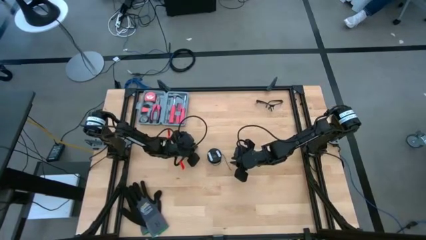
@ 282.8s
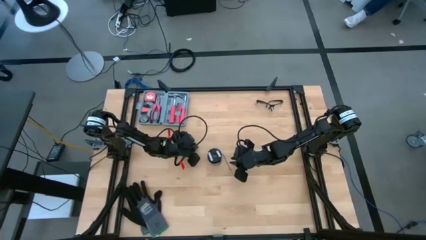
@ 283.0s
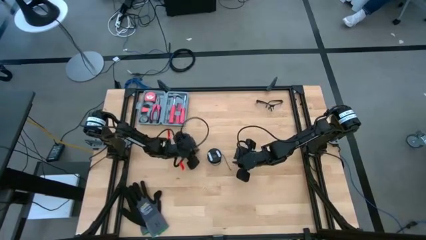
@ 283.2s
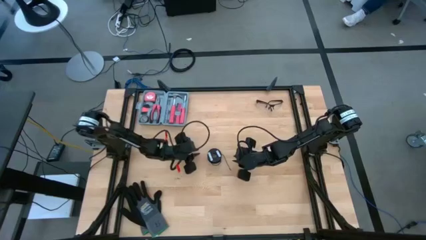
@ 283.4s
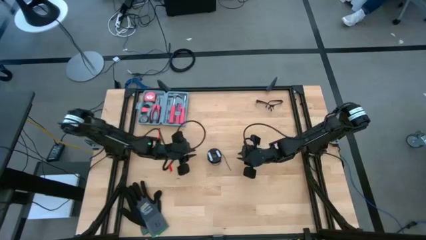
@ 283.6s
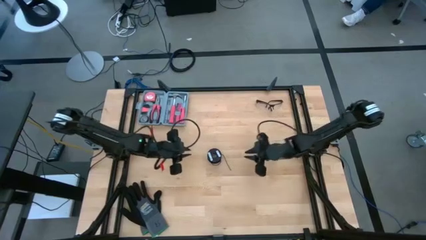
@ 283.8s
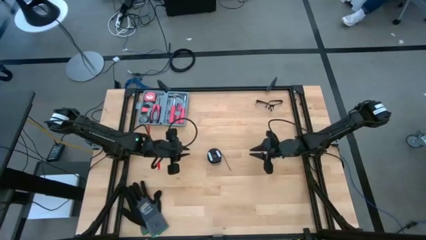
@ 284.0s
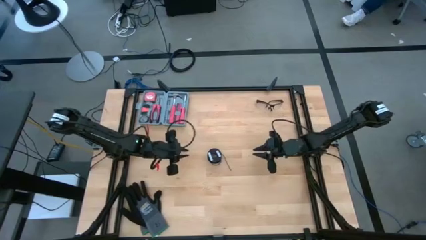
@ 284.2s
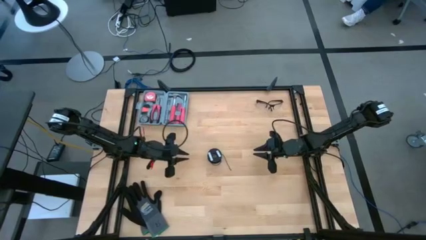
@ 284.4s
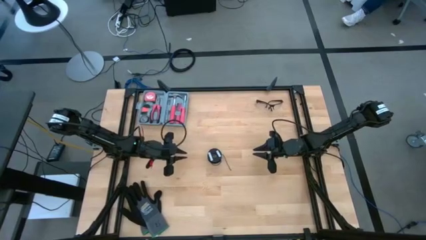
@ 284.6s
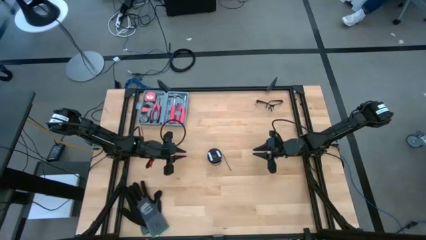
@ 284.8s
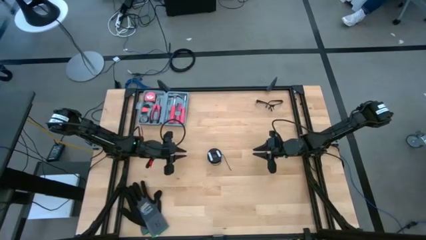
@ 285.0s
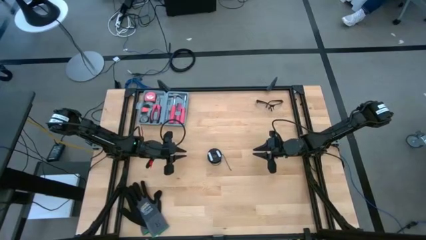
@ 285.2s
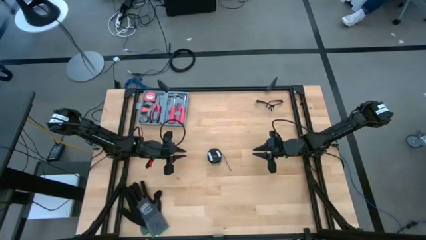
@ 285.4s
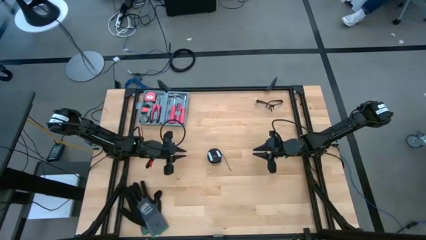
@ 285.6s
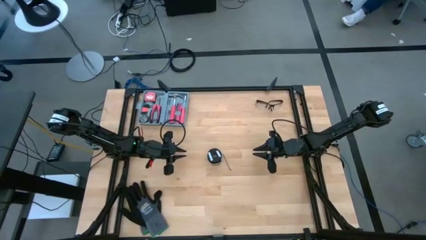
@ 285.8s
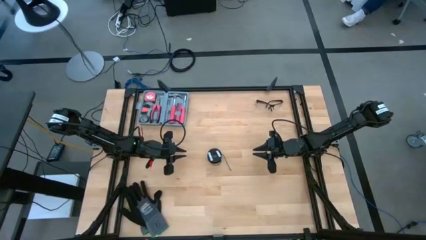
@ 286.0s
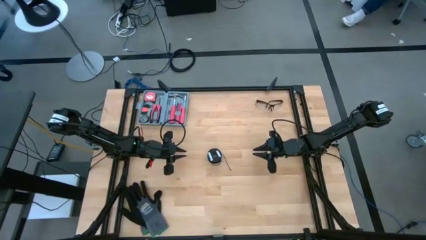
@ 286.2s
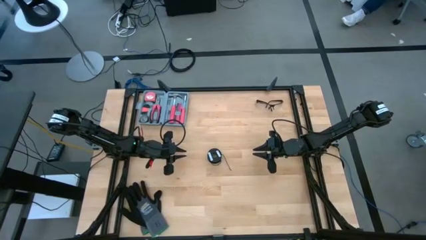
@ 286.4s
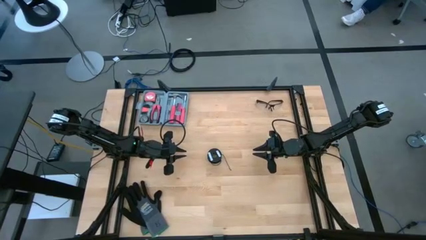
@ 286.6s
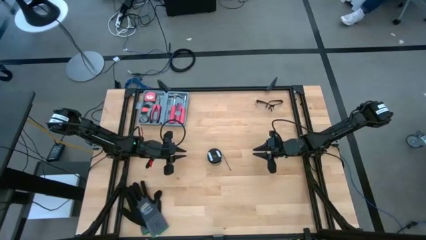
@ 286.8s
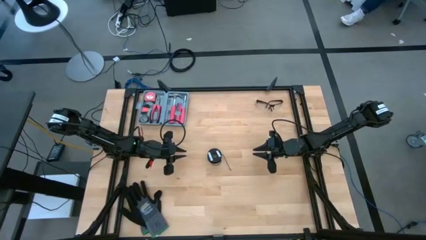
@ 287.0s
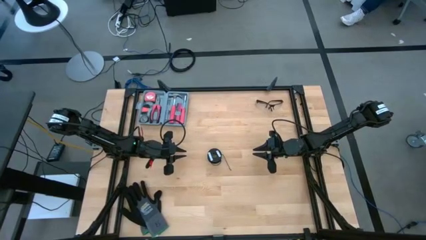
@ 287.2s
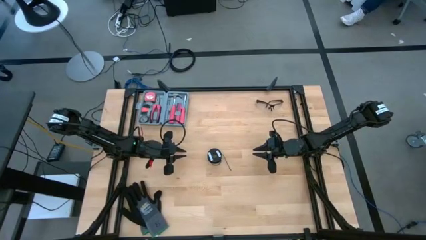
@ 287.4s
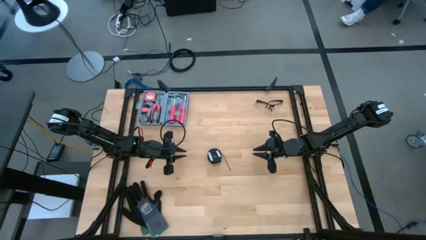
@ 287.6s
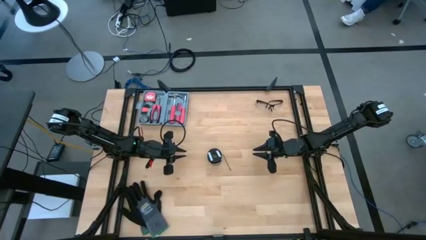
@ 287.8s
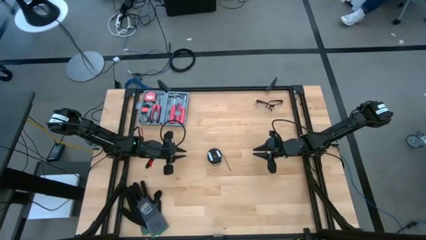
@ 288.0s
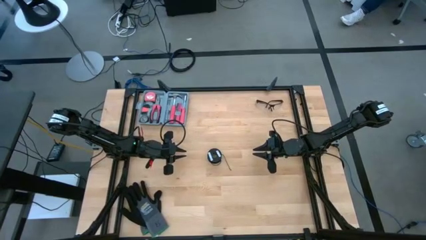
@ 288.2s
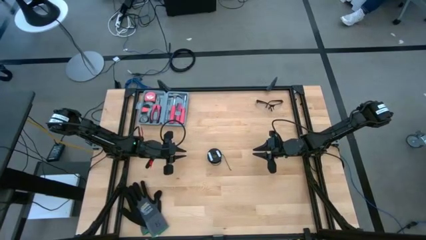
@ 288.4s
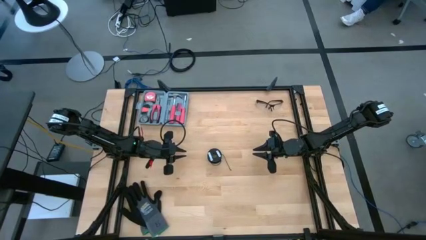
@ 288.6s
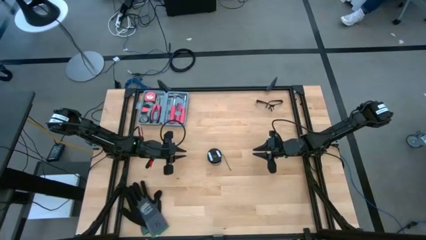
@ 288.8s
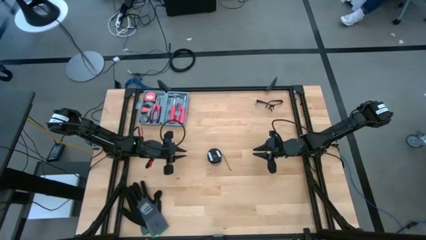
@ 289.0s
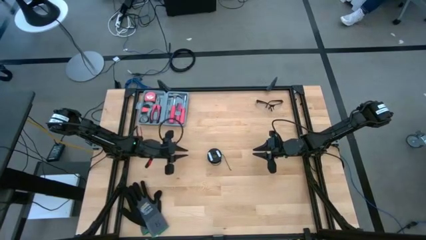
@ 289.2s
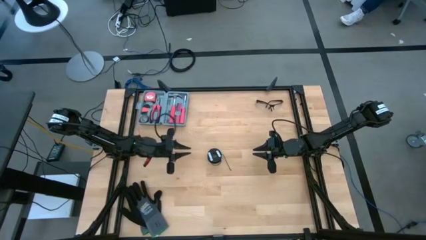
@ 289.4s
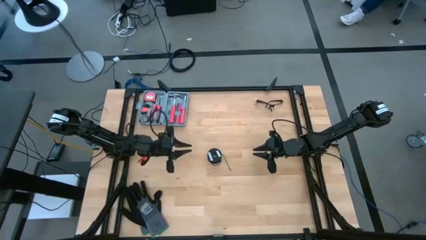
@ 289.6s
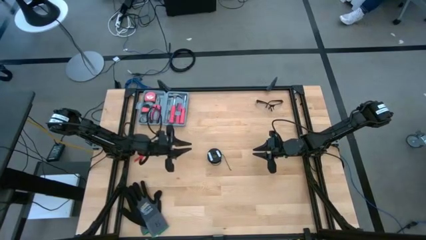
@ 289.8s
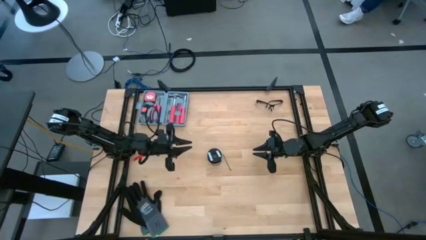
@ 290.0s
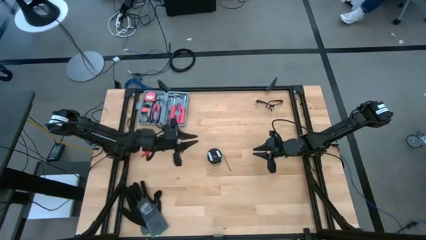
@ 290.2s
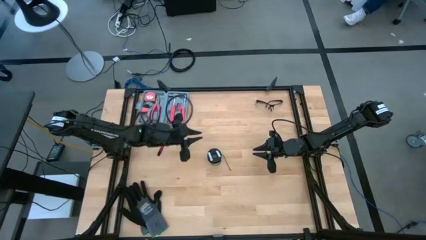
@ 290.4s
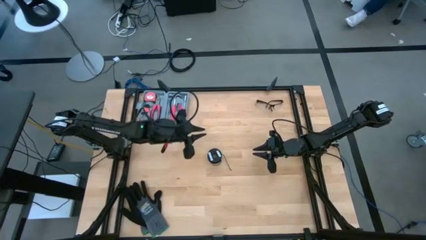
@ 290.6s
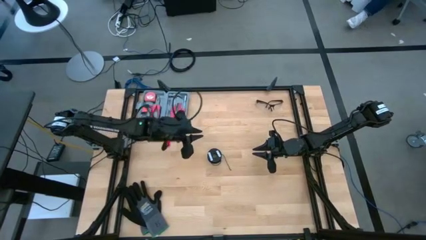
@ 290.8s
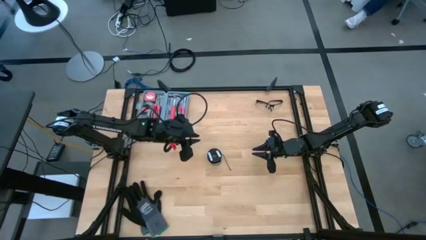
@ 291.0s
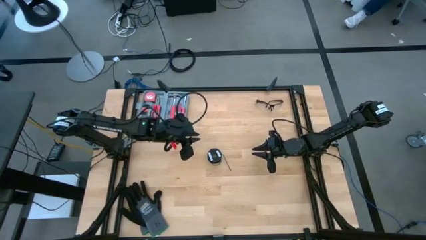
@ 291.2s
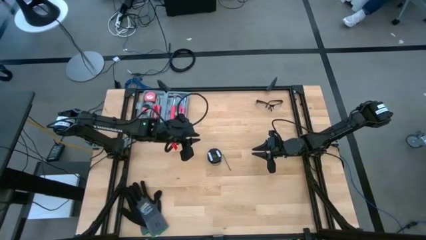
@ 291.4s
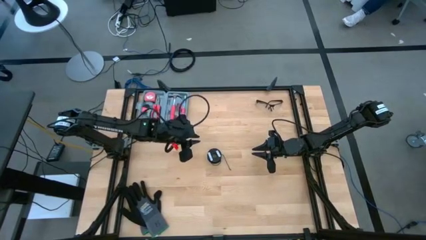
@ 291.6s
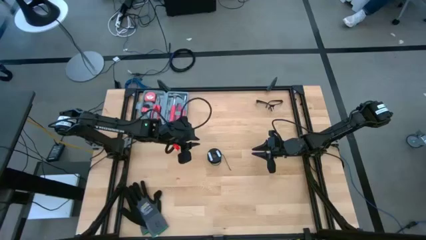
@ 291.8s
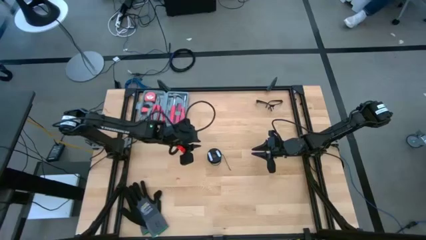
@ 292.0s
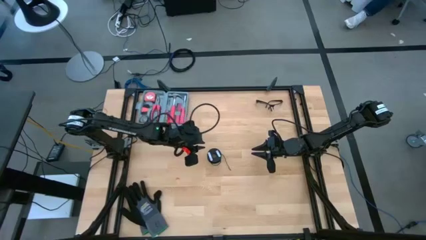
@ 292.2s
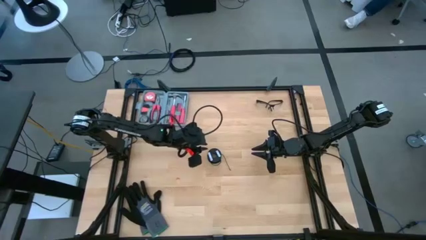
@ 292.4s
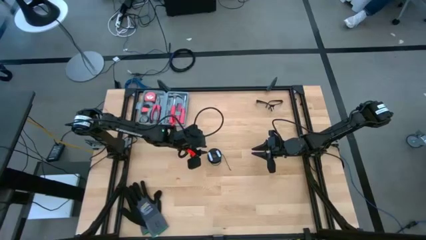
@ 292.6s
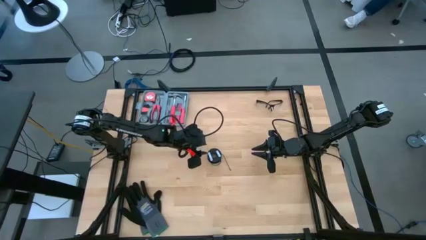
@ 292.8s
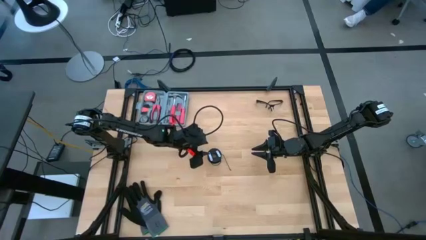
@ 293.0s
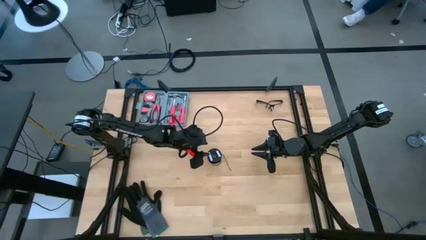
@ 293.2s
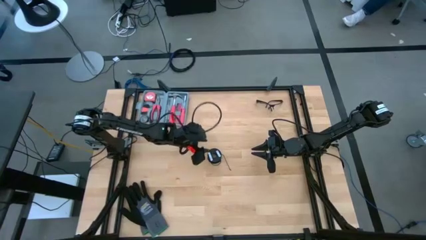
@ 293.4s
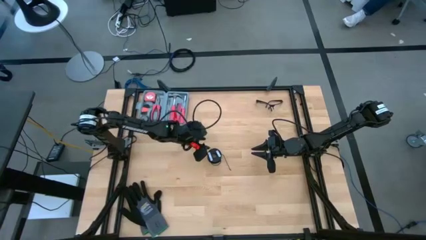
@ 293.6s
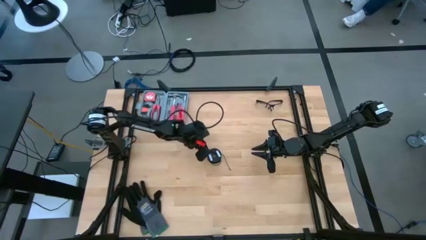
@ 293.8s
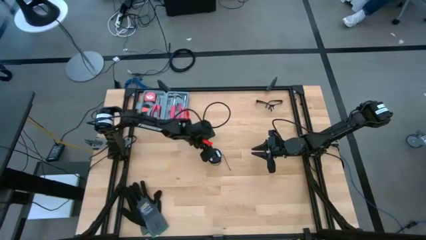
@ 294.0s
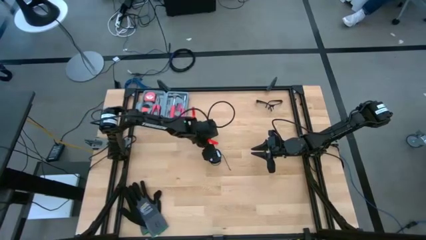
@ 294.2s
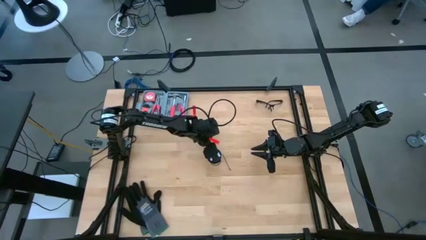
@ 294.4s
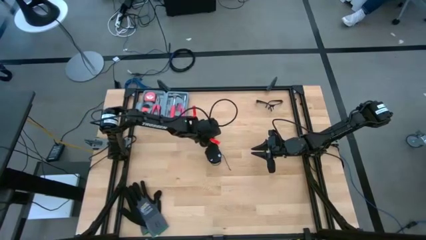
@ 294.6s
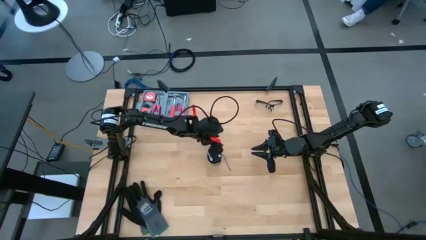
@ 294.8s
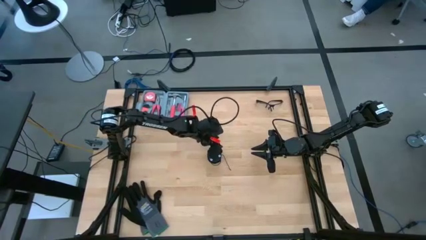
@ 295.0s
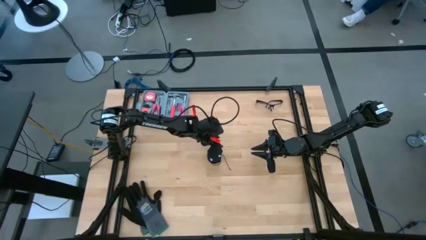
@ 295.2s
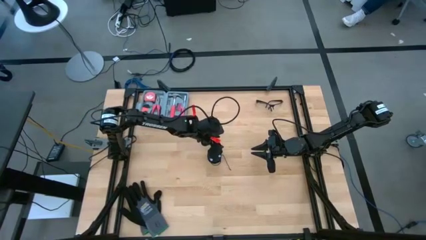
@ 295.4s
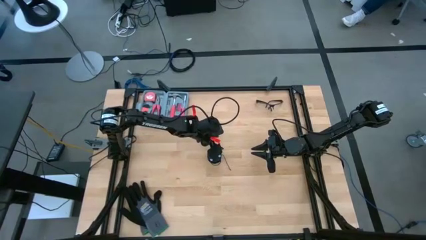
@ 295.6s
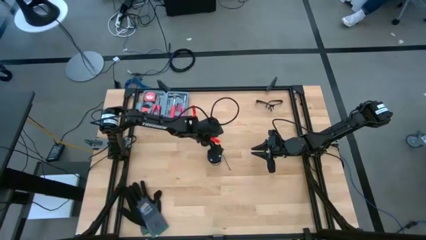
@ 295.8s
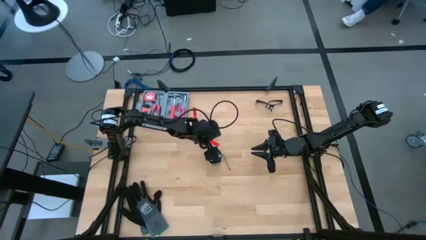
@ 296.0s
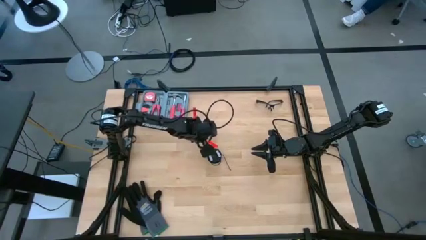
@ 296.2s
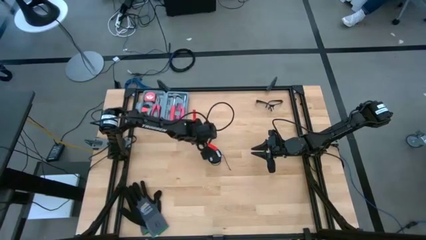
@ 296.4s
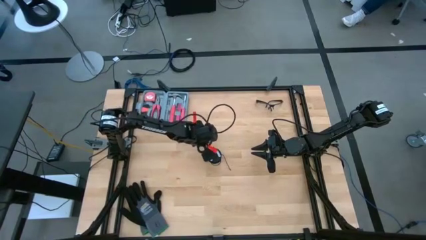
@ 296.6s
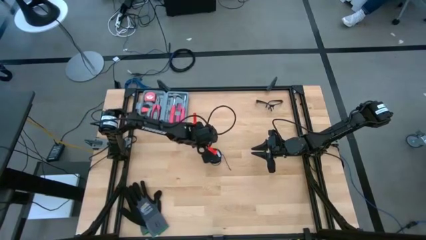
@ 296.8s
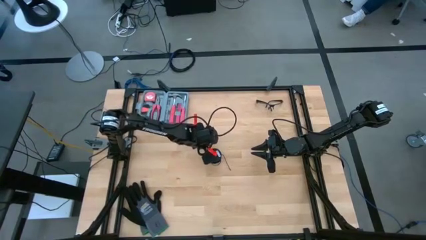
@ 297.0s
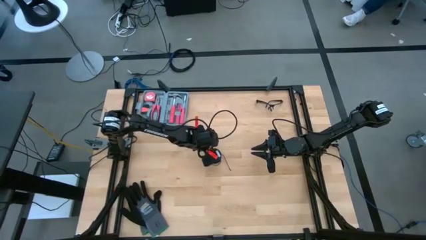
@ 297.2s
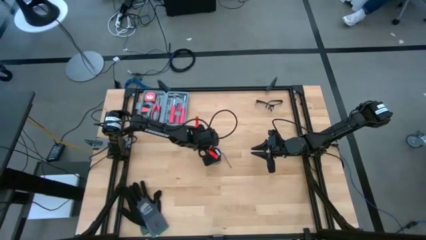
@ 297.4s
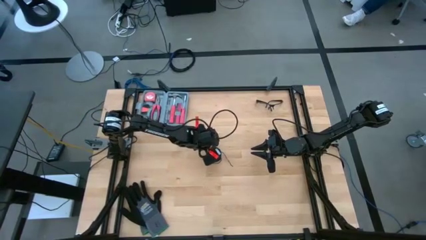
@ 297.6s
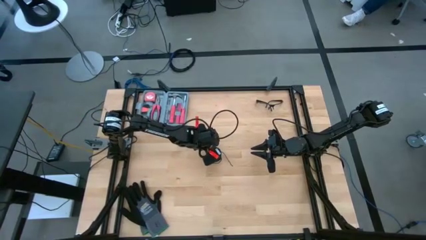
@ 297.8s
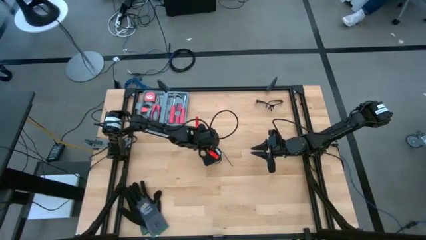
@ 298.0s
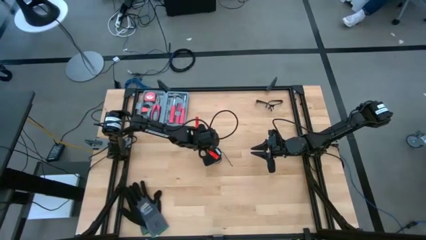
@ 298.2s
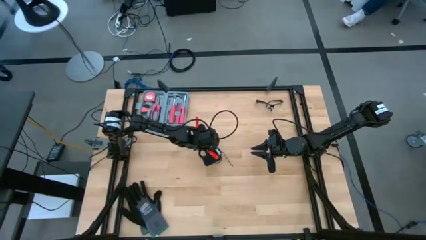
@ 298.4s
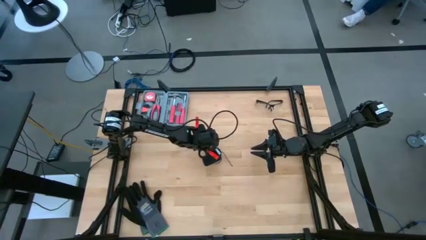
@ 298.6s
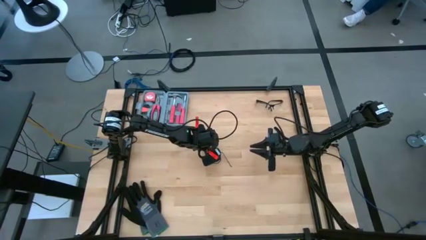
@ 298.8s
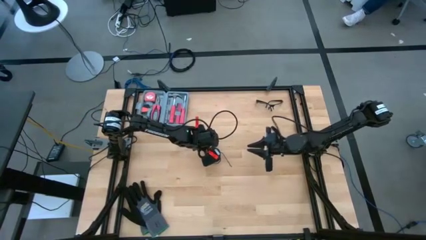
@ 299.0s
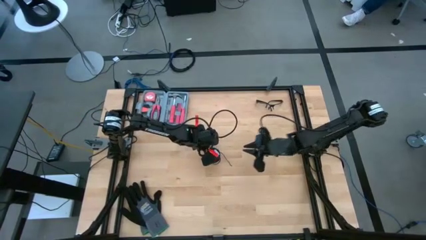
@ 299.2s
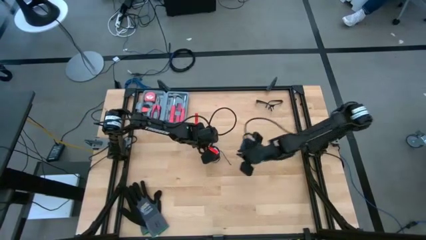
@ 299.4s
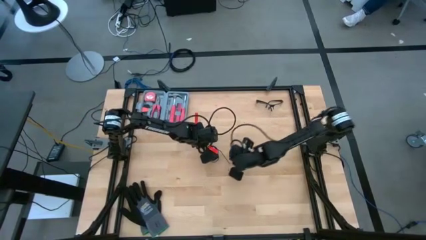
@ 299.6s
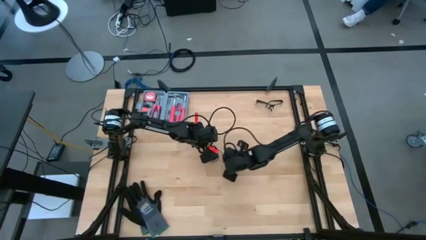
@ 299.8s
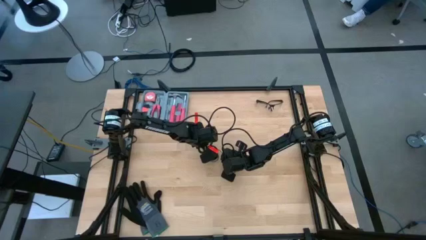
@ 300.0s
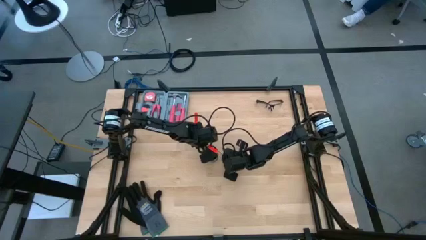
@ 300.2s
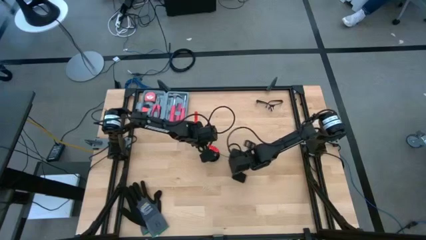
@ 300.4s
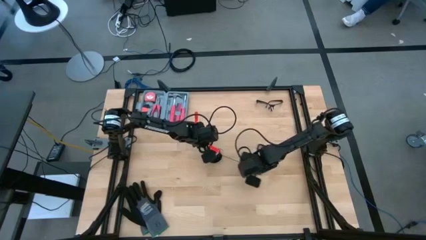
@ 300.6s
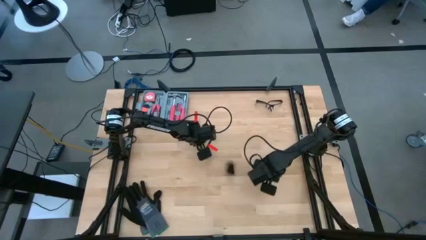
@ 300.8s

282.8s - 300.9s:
Task: Coil cords
Uncoil the black wire from the black spool
